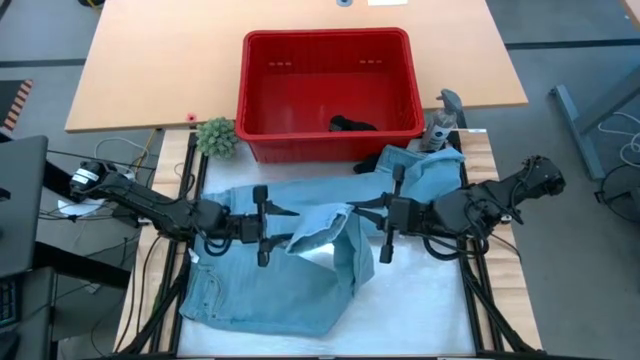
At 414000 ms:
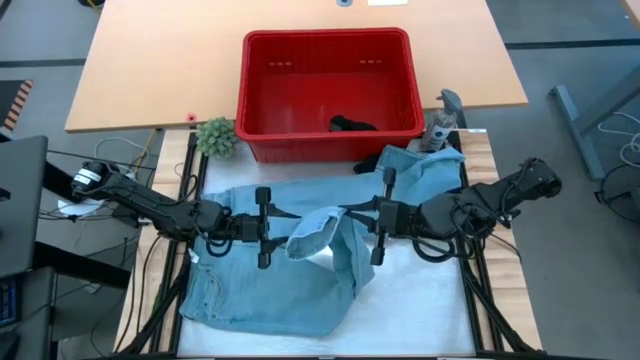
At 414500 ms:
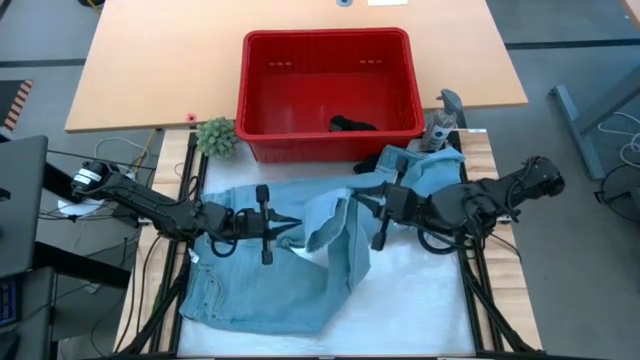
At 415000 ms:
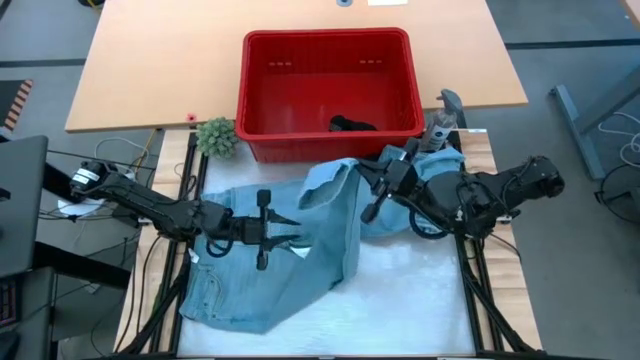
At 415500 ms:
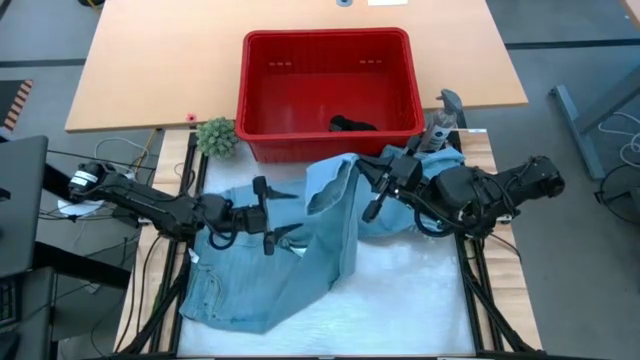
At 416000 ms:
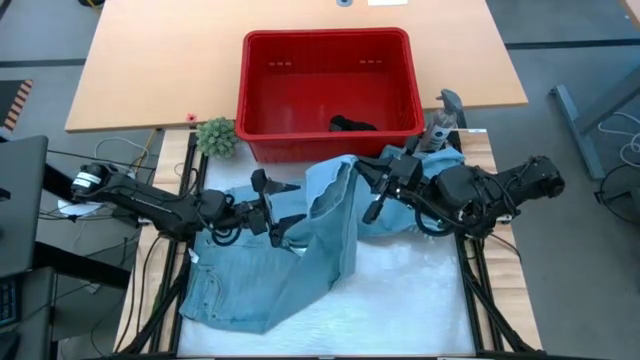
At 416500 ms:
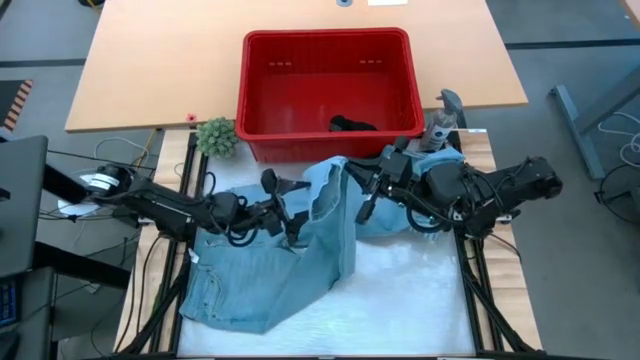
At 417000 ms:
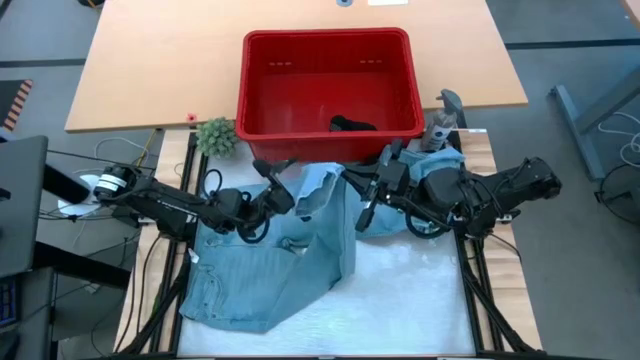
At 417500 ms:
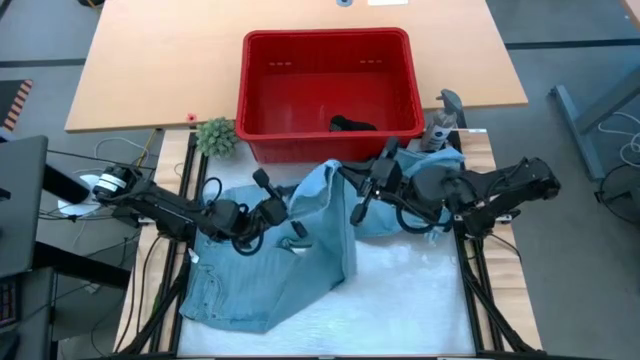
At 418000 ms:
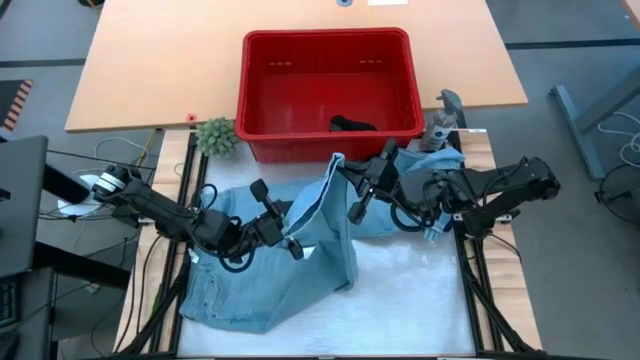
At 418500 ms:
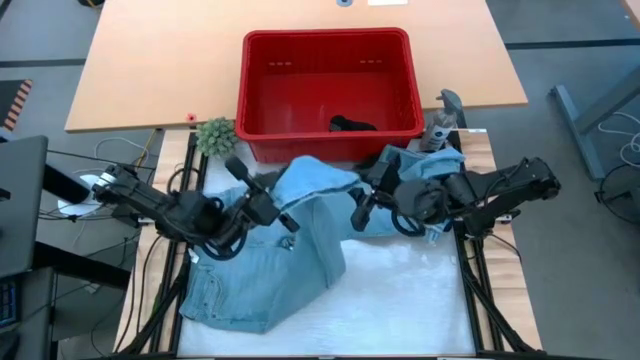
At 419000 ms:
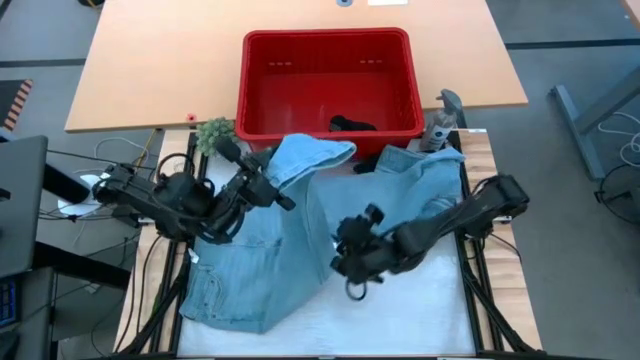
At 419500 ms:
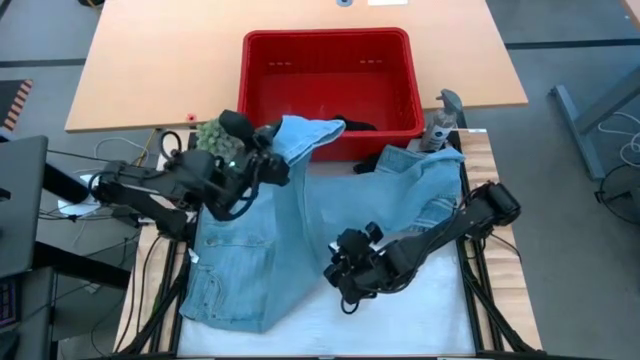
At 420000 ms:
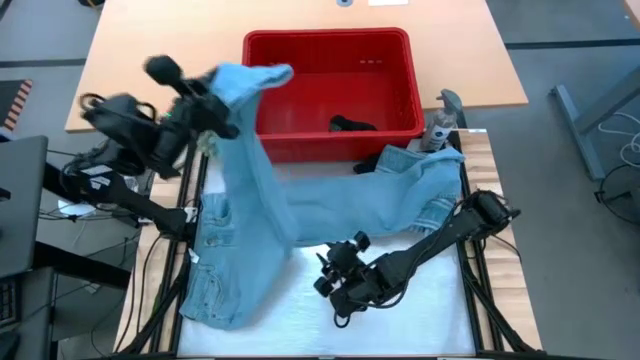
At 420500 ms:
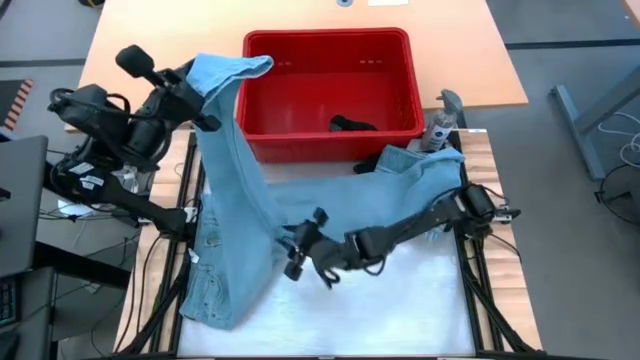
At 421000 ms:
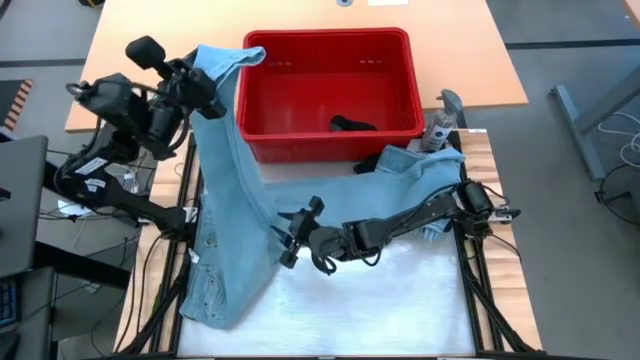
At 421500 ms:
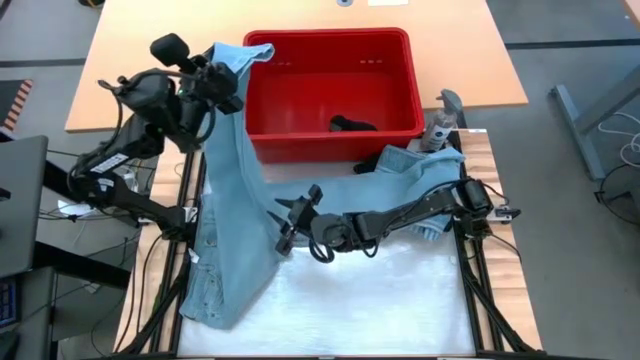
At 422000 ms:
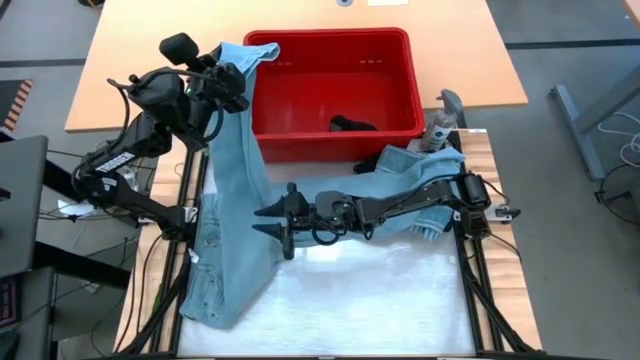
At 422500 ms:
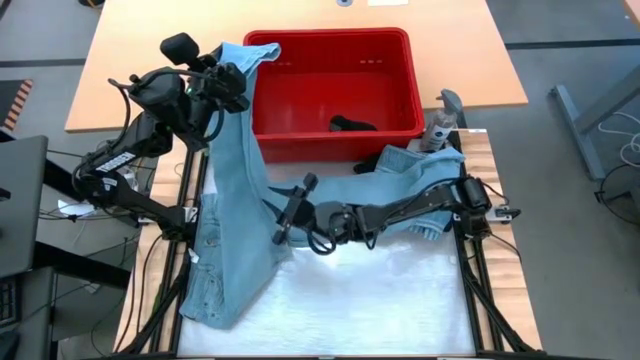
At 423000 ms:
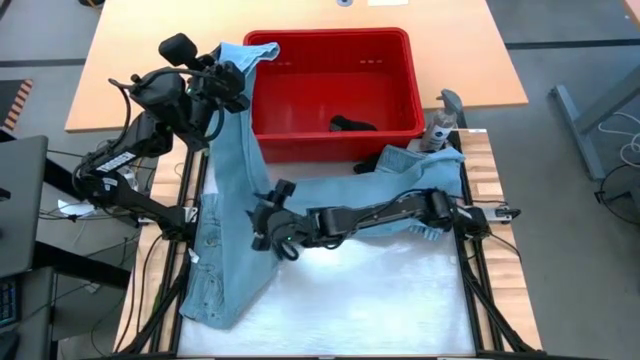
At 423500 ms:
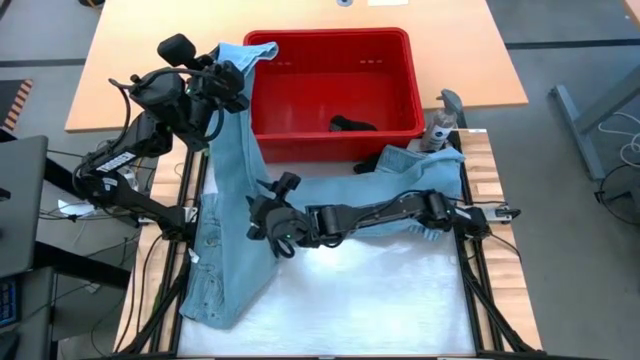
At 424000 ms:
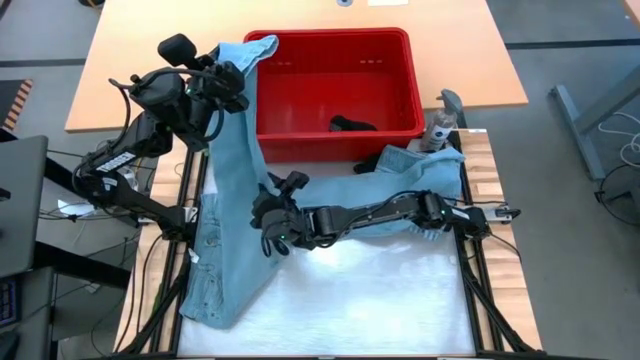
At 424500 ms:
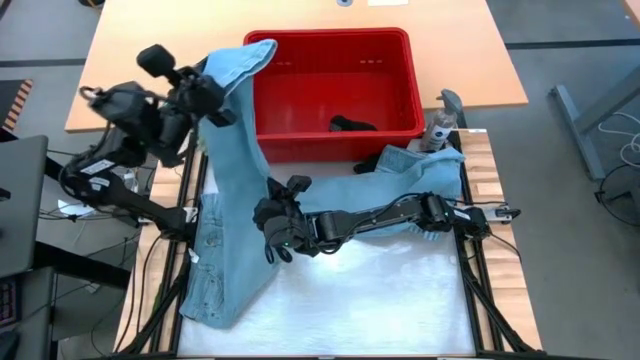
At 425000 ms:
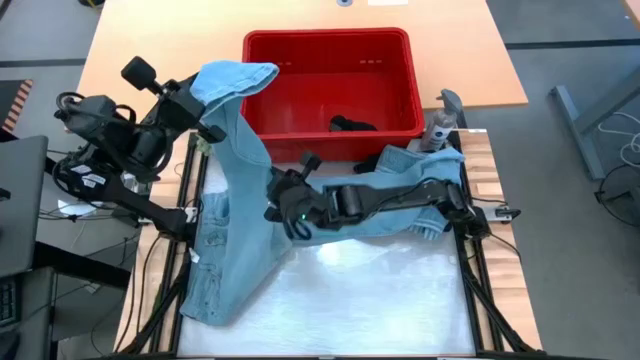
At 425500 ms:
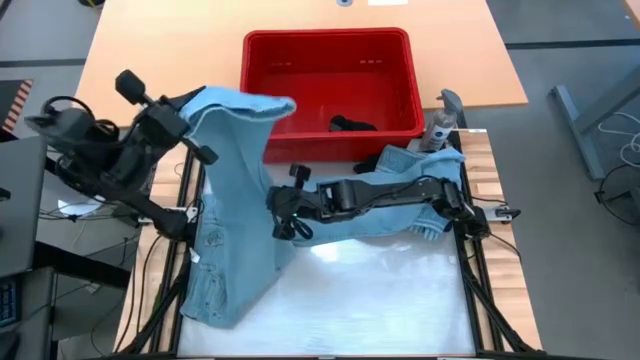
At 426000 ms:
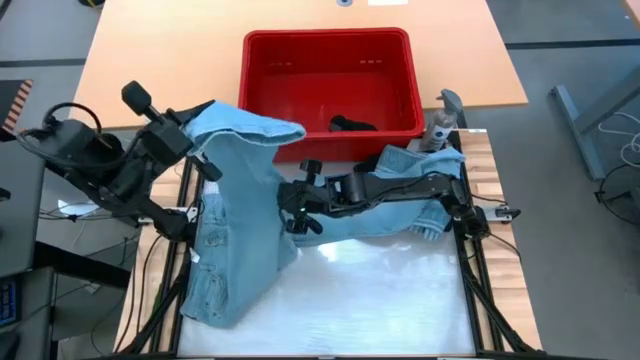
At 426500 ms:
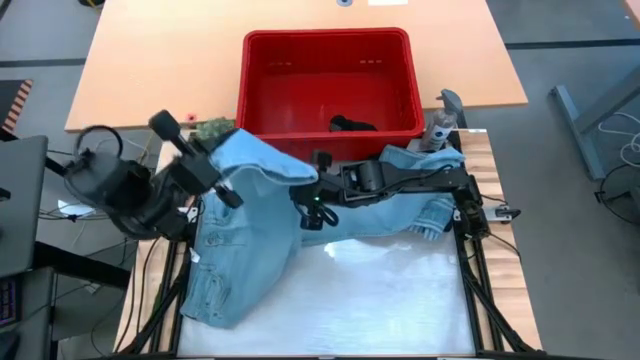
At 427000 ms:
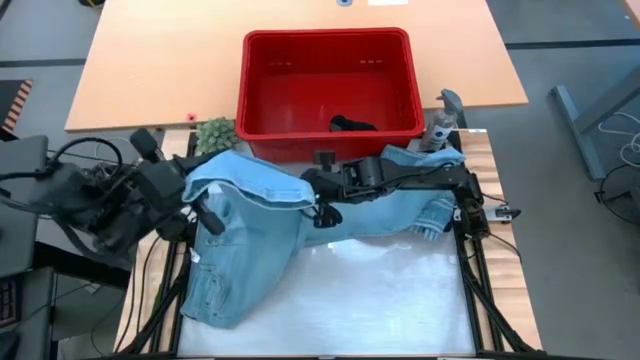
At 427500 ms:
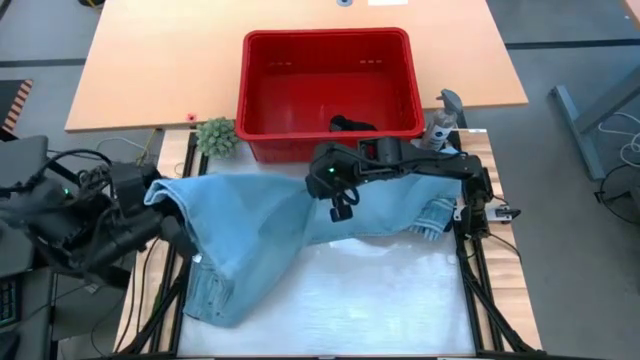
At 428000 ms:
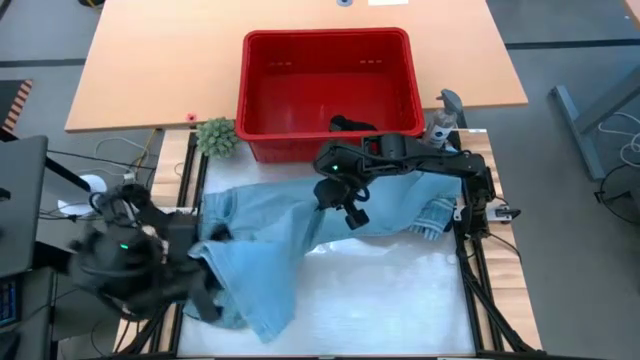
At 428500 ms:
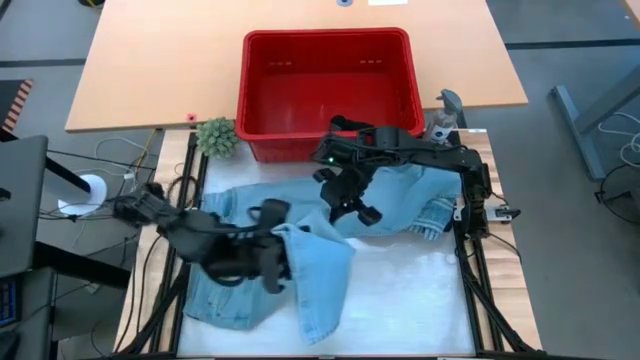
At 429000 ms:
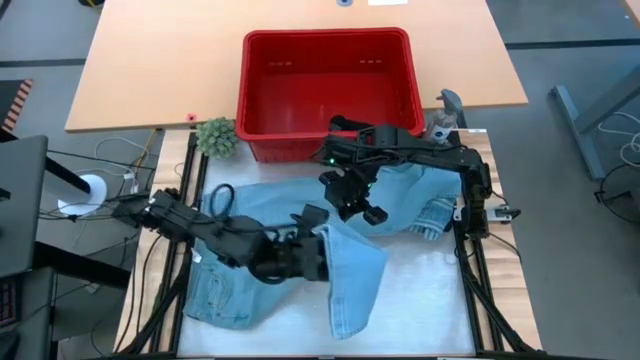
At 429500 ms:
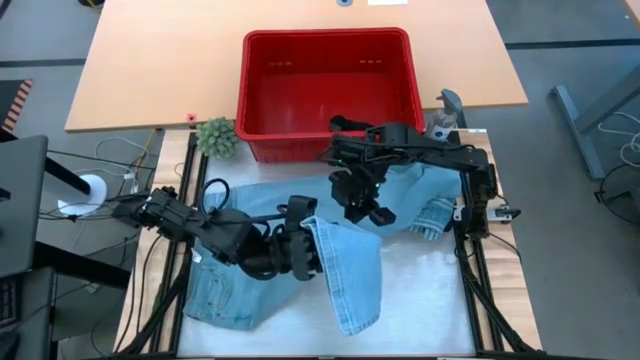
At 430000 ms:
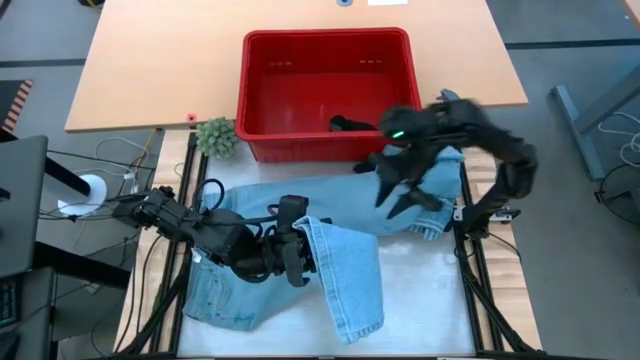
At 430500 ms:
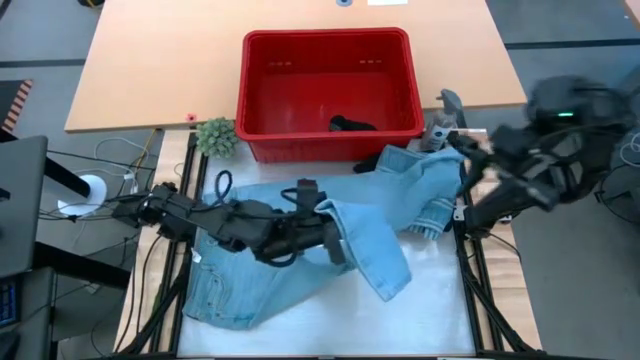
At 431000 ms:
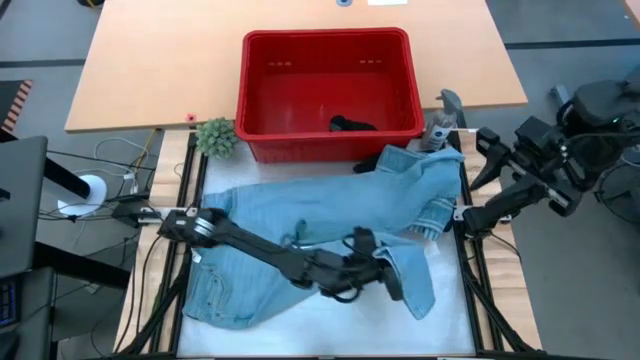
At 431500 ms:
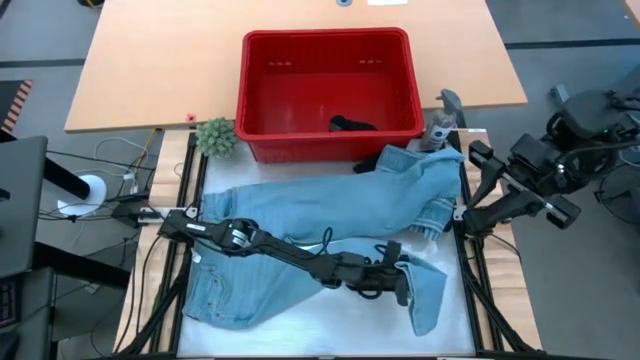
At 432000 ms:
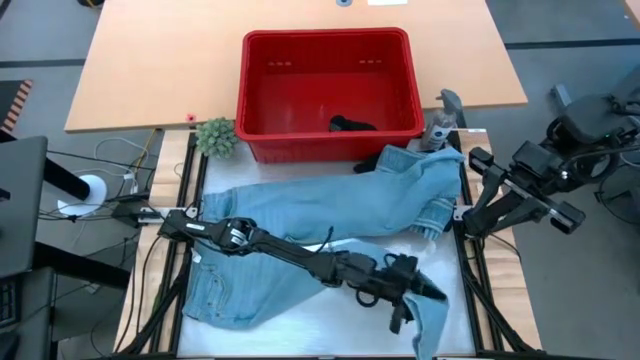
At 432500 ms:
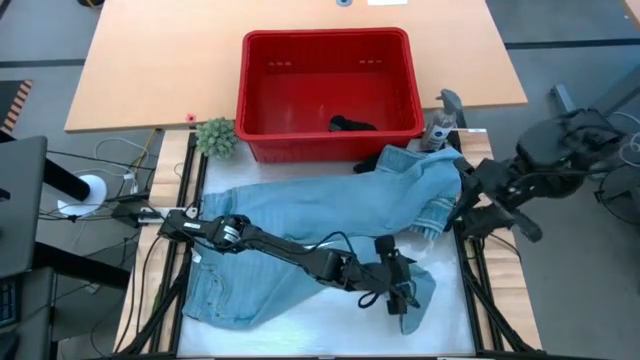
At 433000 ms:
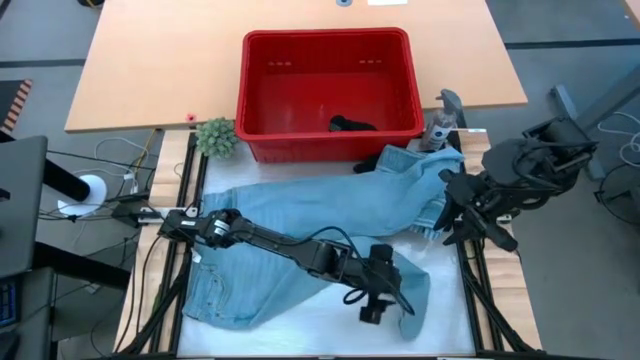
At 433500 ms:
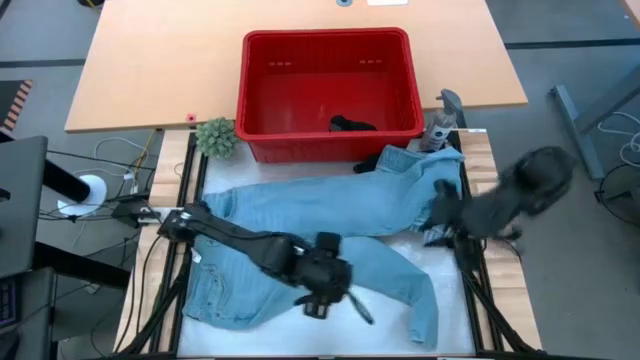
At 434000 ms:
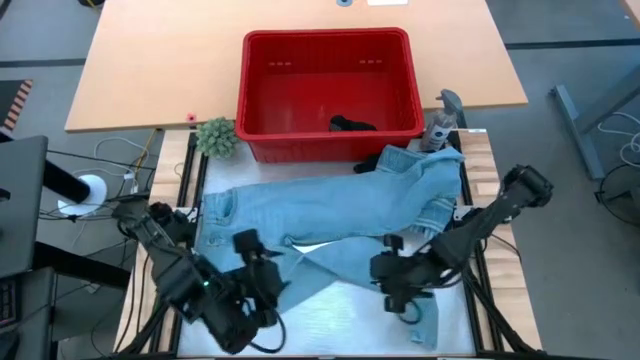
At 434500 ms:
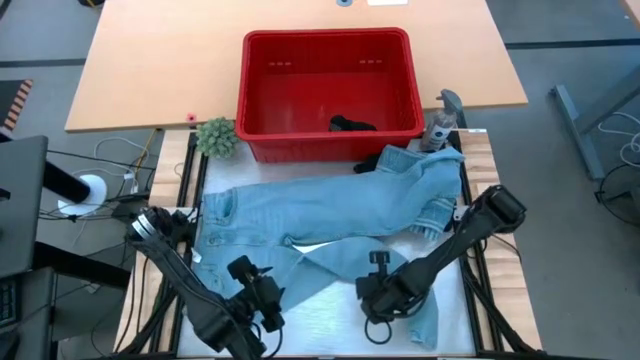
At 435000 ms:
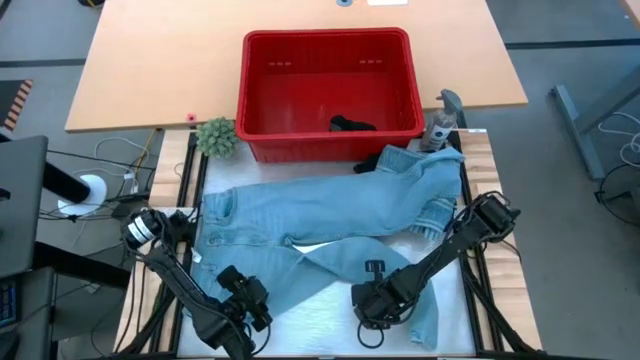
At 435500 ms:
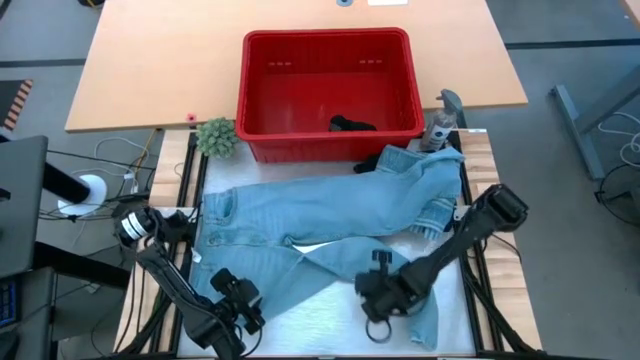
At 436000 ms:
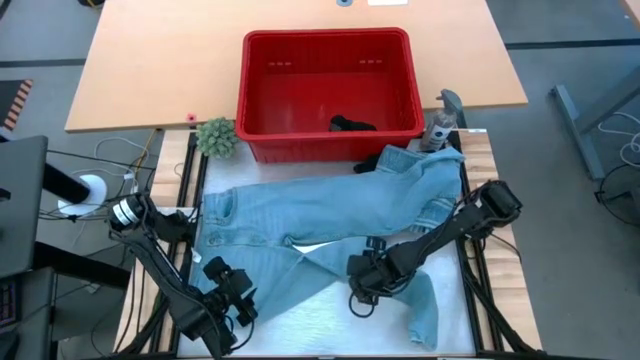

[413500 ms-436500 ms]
Task: Fold Laundry from Bin
Fold the blue pants
